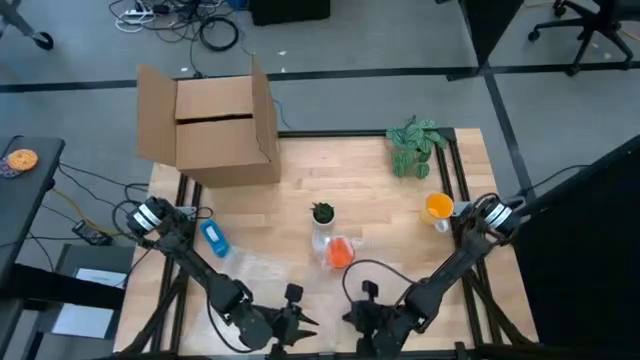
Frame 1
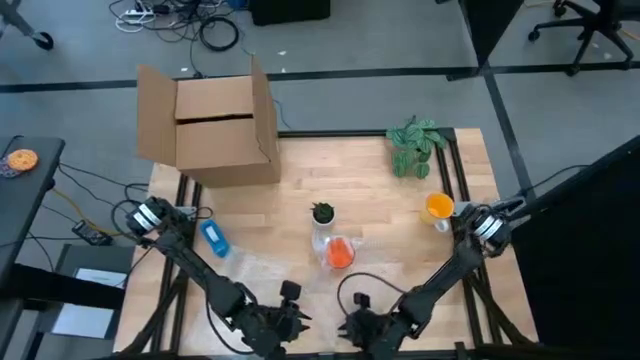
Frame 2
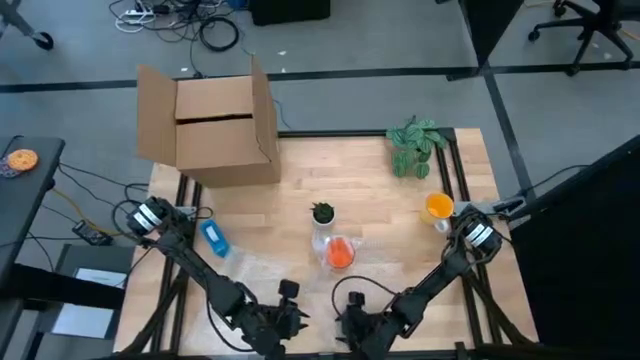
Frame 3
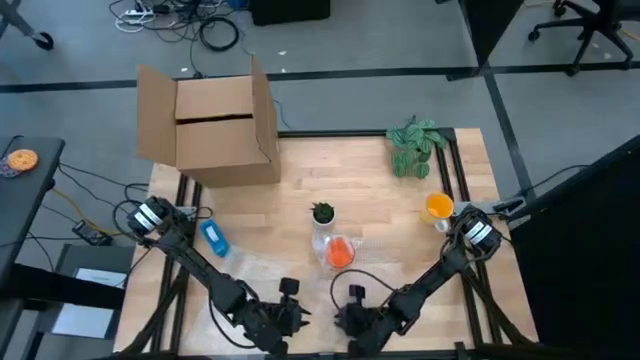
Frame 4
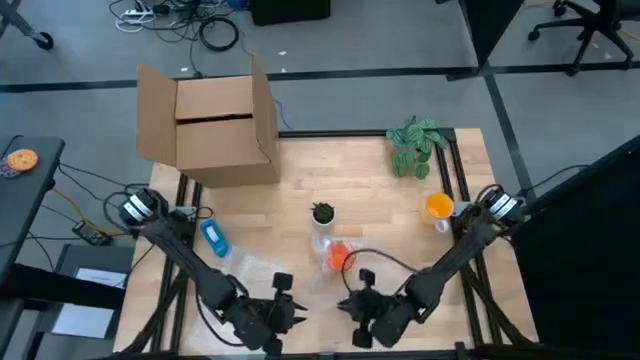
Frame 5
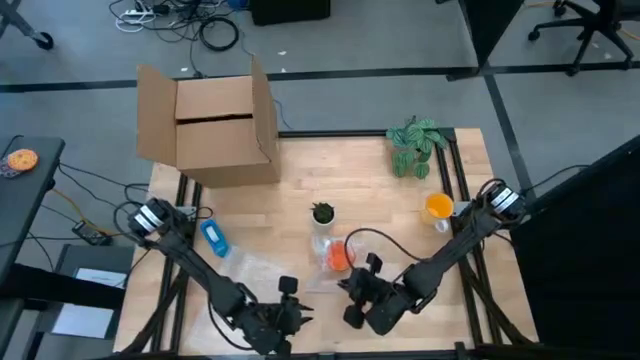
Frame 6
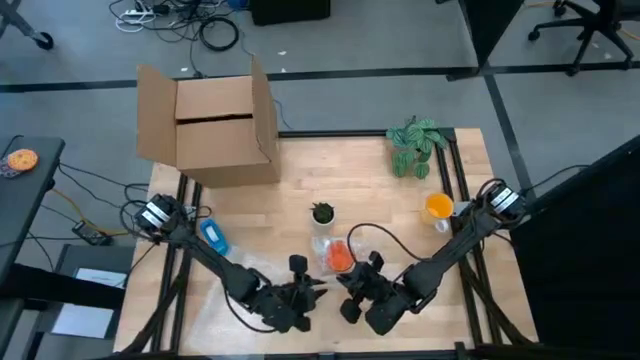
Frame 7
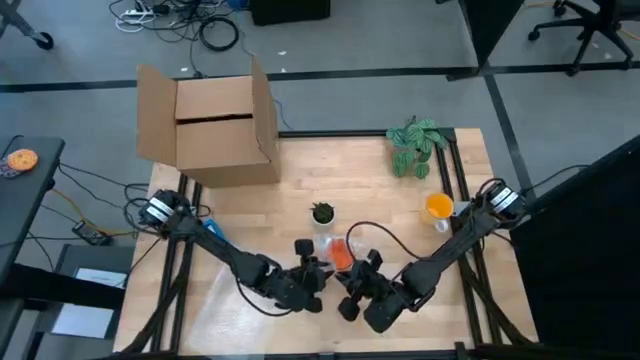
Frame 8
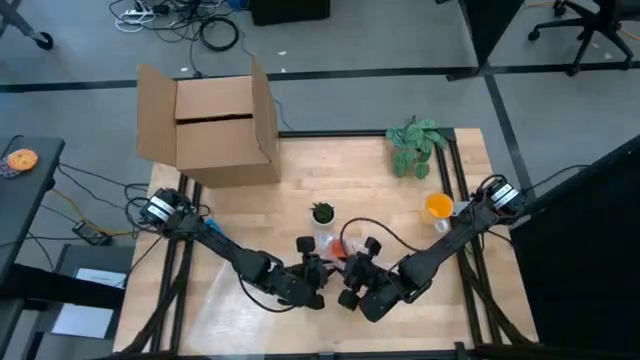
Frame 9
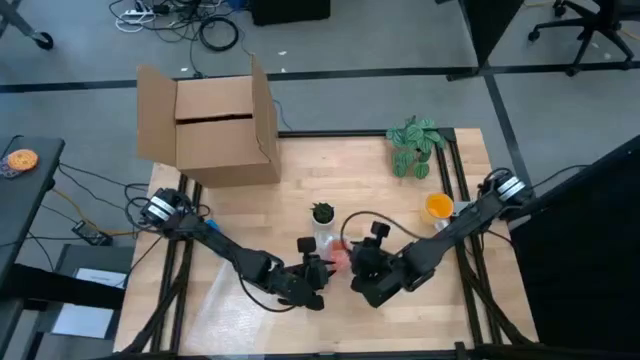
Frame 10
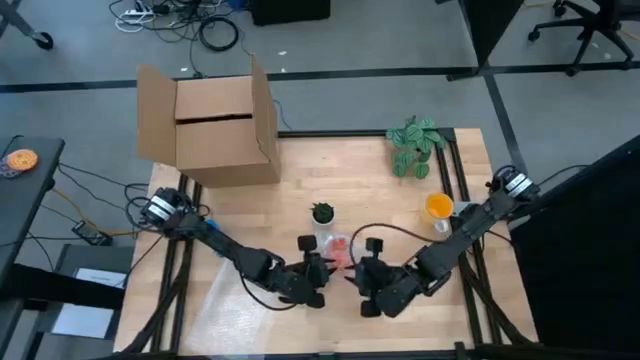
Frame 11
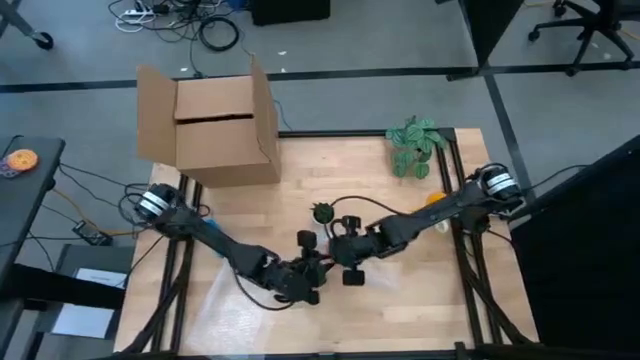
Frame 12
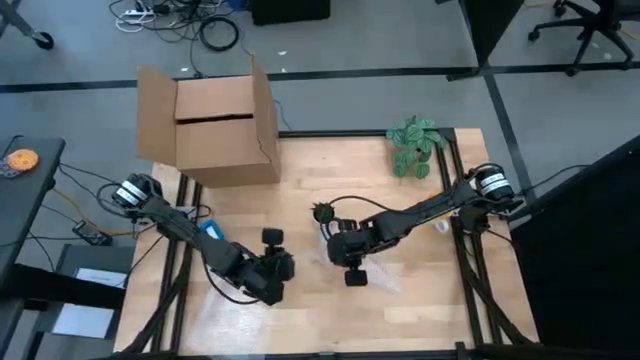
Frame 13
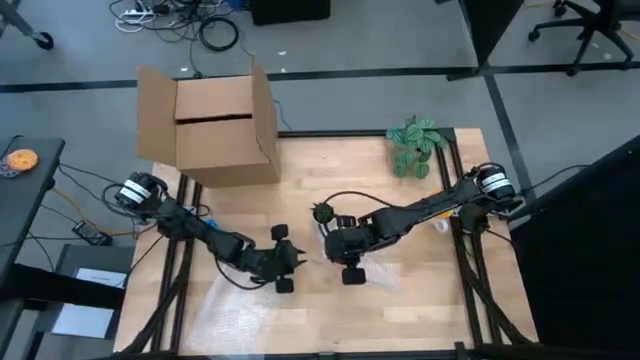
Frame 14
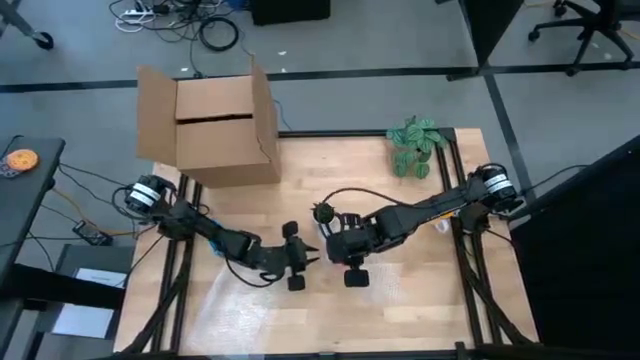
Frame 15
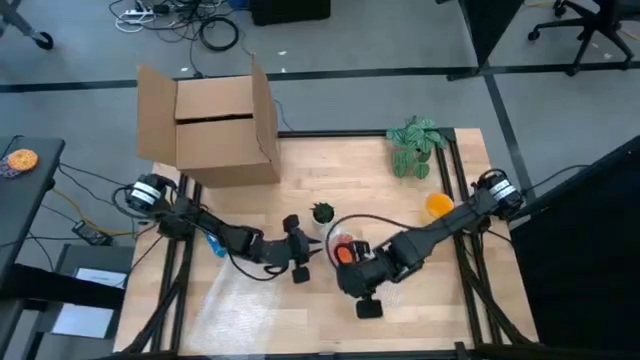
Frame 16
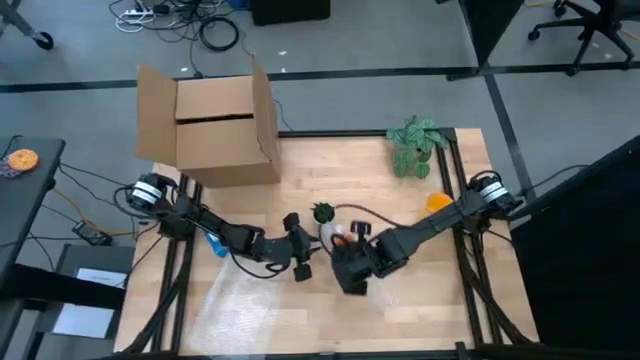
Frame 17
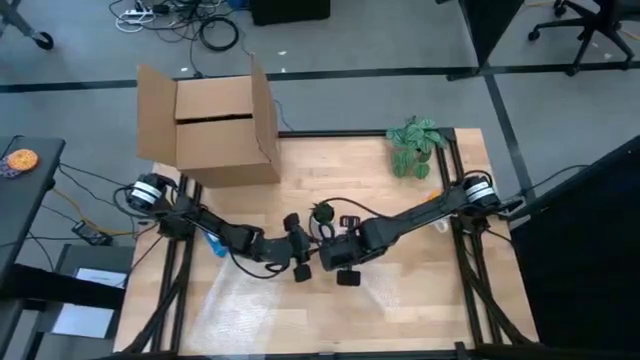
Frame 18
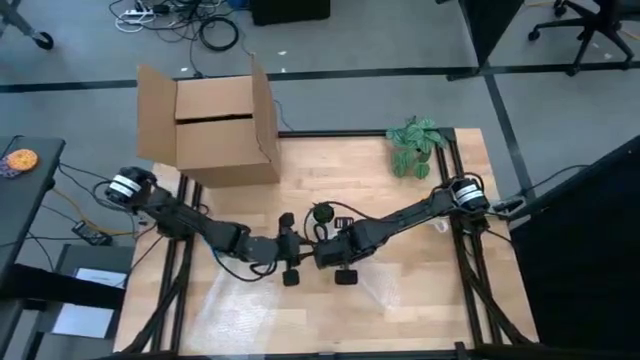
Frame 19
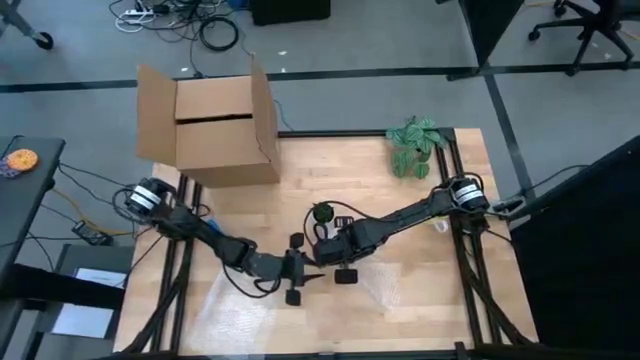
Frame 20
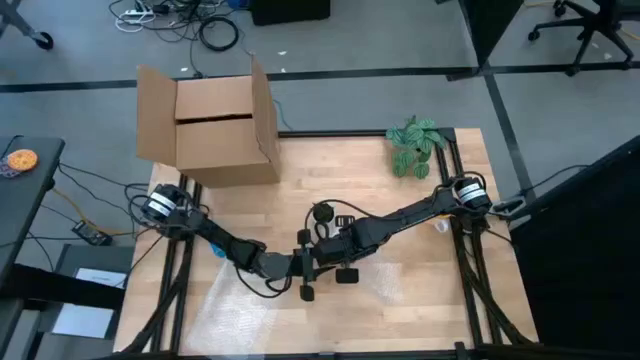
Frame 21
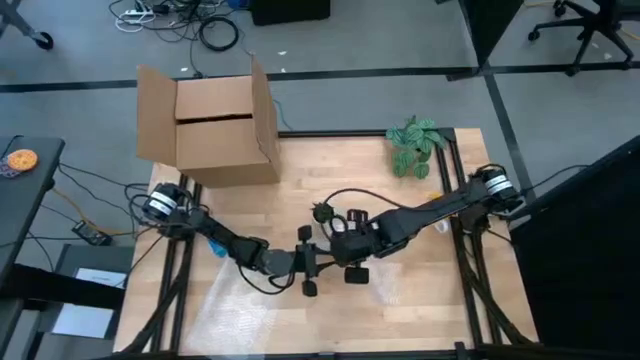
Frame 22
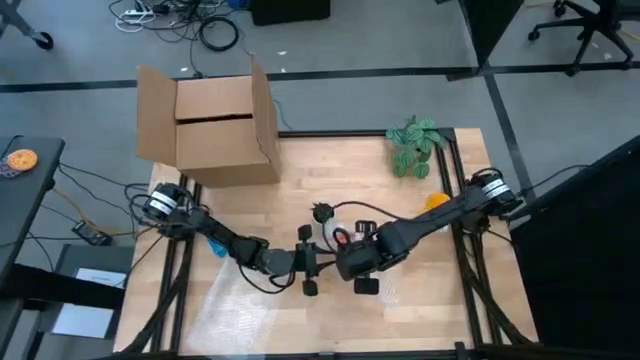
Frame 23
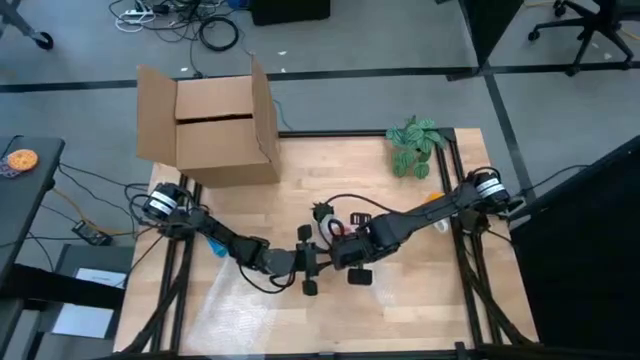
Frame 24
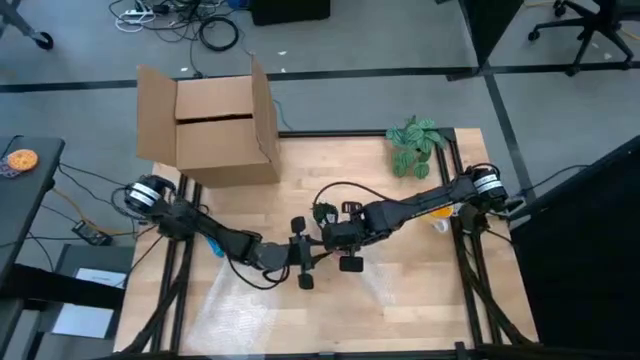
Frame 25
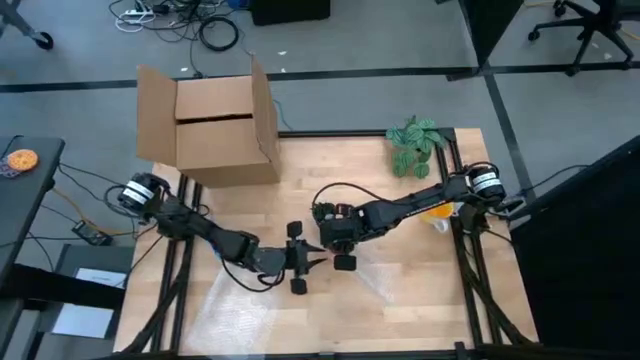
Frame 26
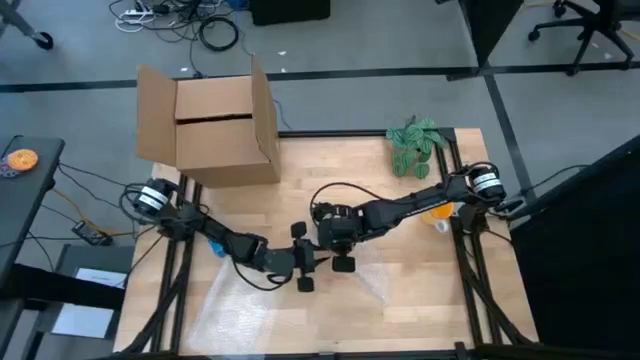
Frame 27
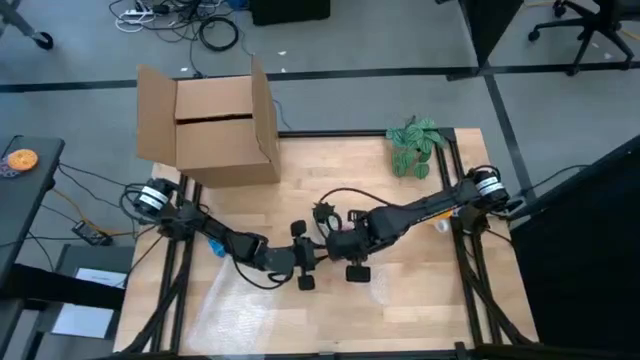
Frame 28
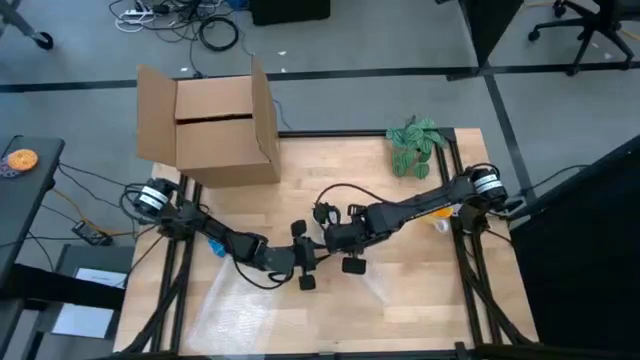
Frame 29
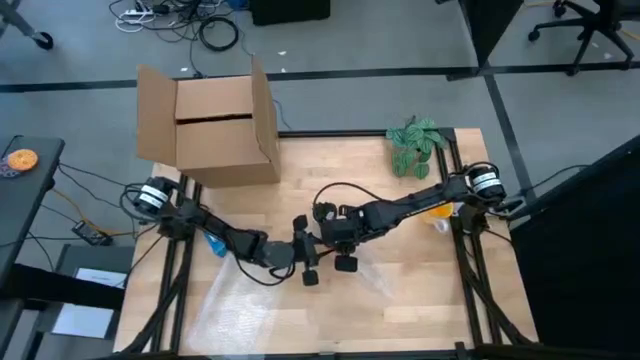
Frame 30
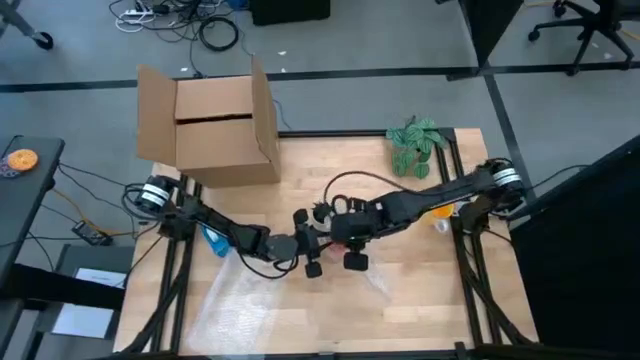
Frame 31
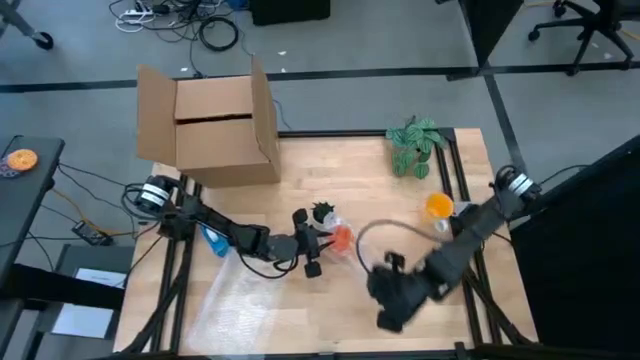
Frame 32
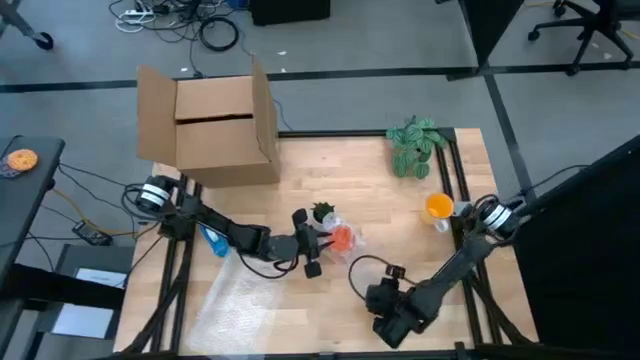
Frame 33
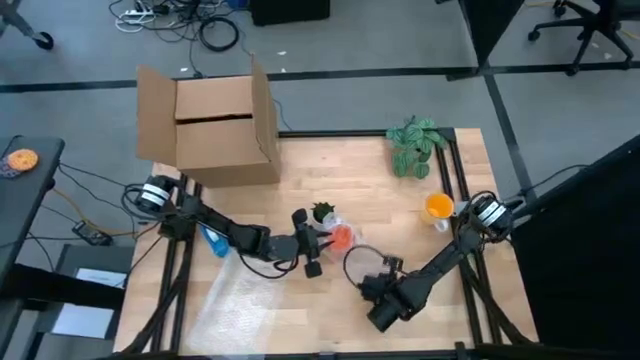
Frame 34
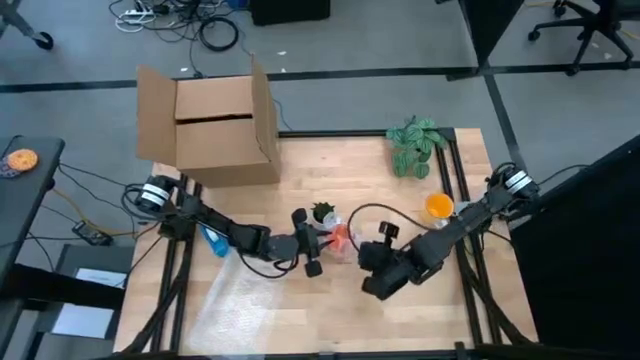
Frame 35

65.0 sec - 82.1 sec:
Task: wrap mug
Wrap the orange mug with the transparent bubble wrap
